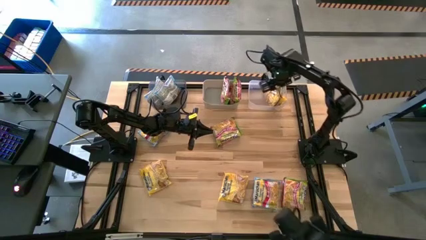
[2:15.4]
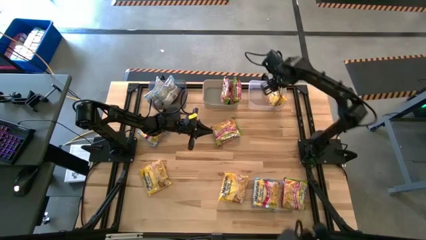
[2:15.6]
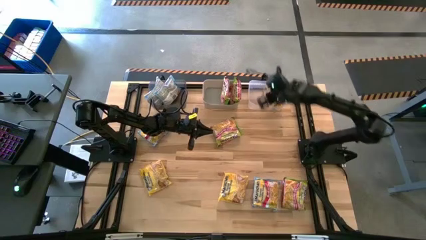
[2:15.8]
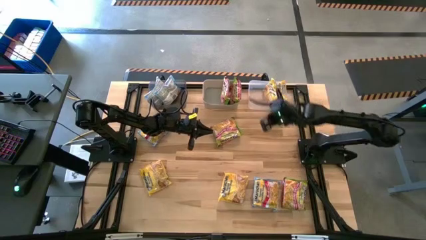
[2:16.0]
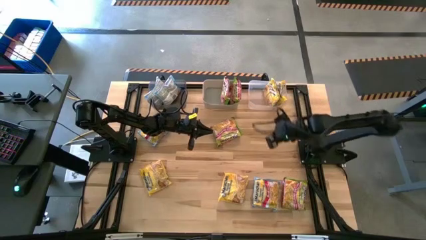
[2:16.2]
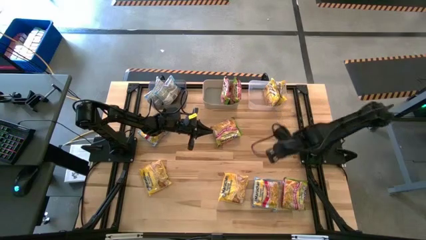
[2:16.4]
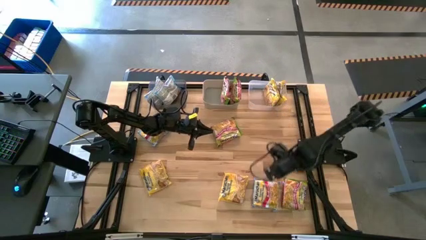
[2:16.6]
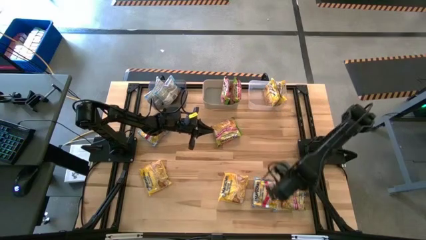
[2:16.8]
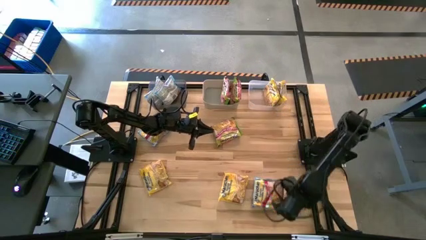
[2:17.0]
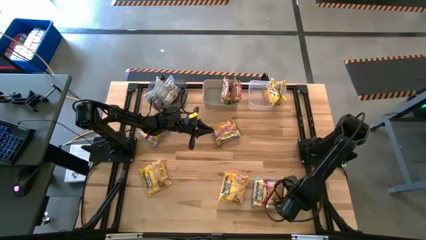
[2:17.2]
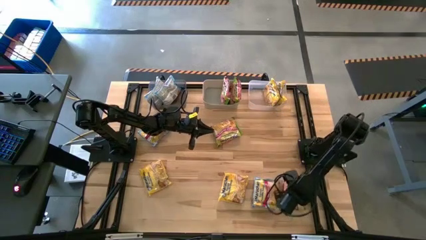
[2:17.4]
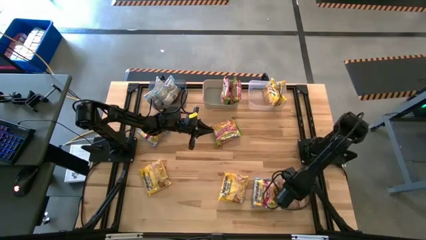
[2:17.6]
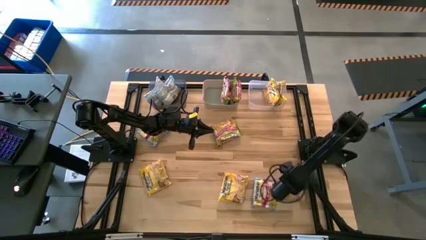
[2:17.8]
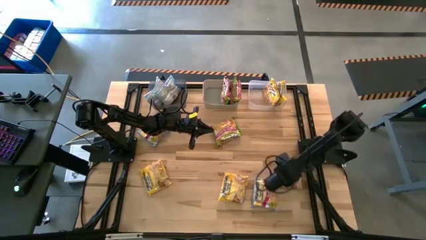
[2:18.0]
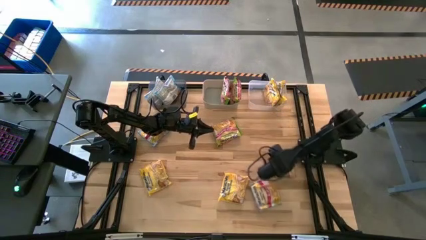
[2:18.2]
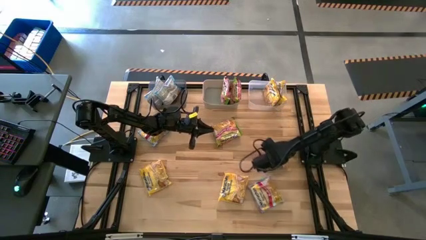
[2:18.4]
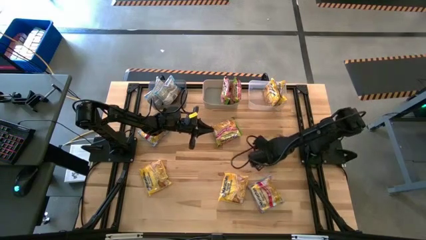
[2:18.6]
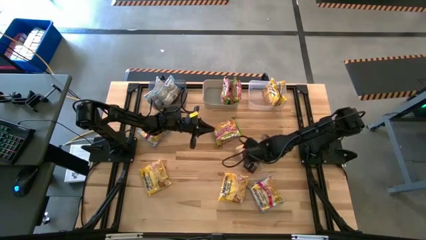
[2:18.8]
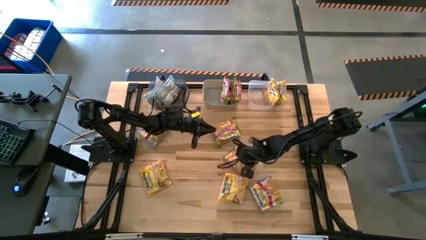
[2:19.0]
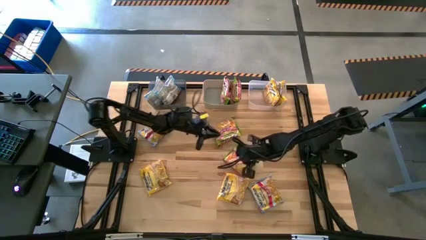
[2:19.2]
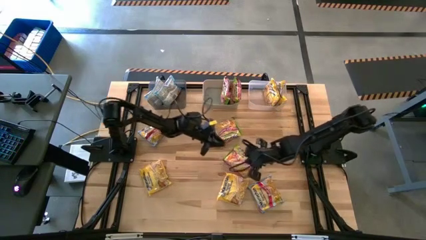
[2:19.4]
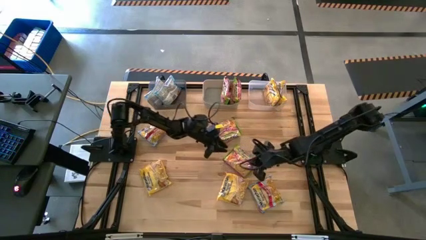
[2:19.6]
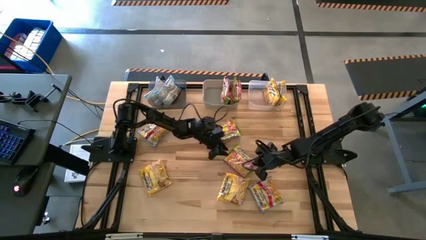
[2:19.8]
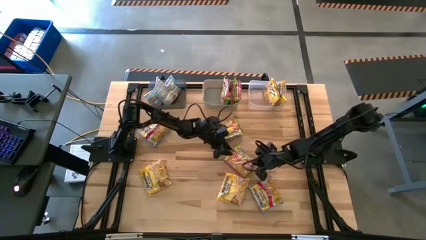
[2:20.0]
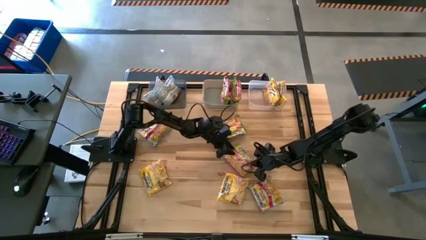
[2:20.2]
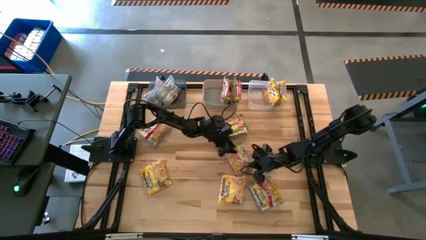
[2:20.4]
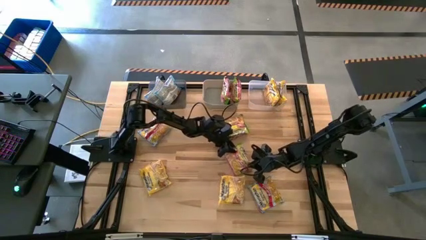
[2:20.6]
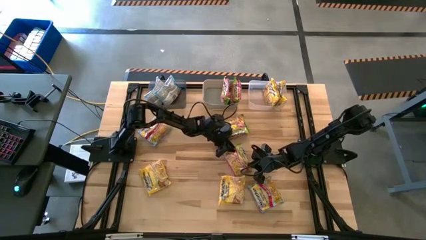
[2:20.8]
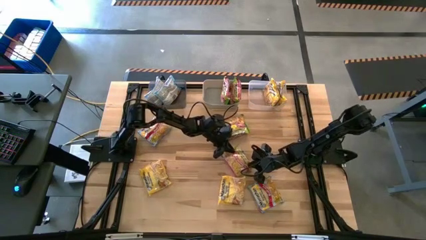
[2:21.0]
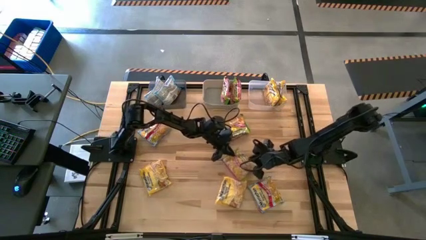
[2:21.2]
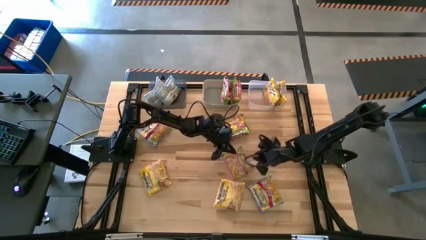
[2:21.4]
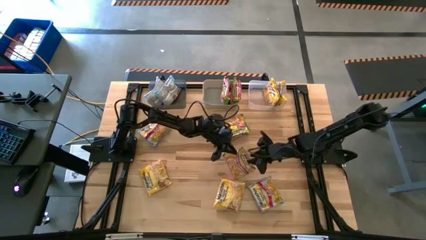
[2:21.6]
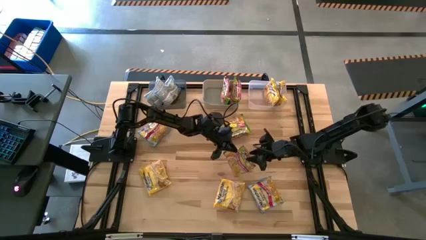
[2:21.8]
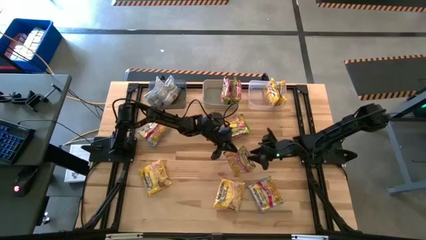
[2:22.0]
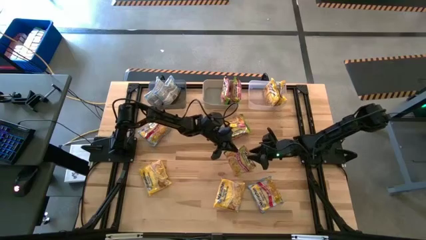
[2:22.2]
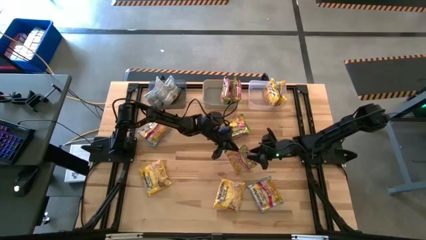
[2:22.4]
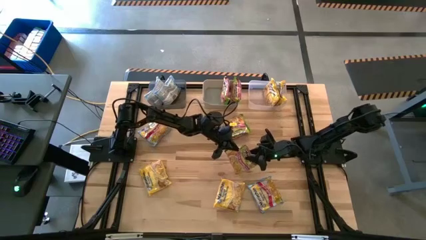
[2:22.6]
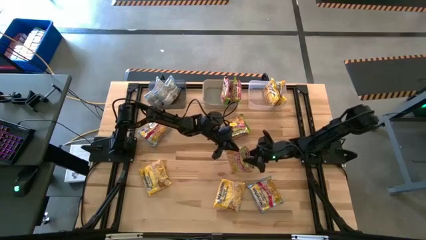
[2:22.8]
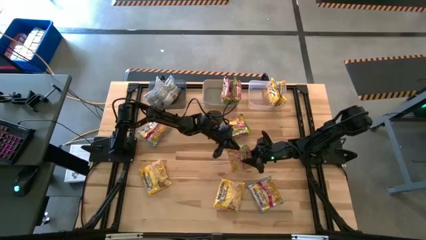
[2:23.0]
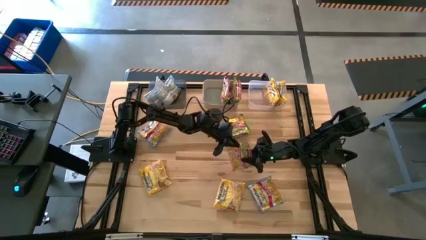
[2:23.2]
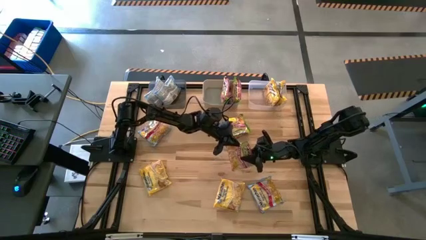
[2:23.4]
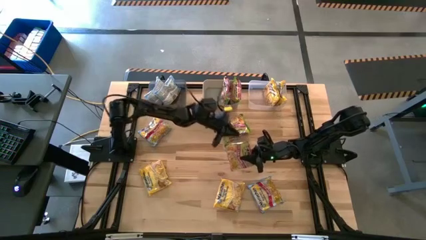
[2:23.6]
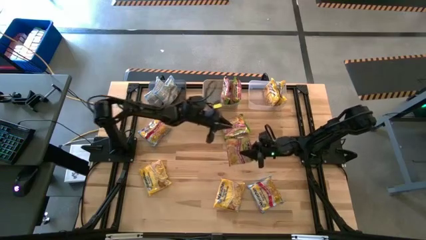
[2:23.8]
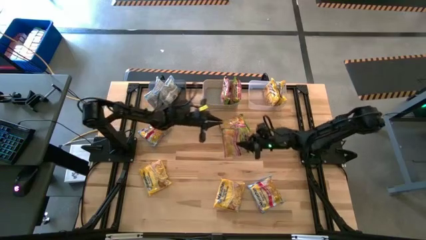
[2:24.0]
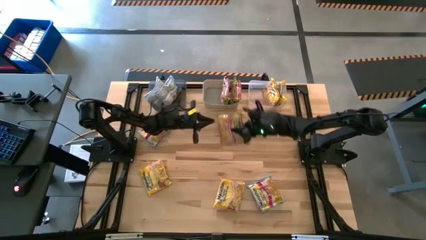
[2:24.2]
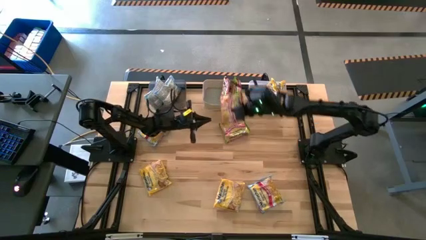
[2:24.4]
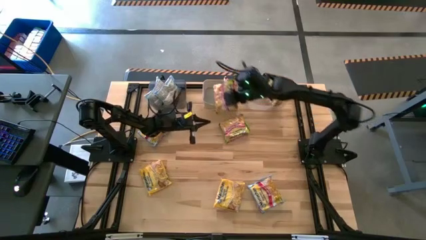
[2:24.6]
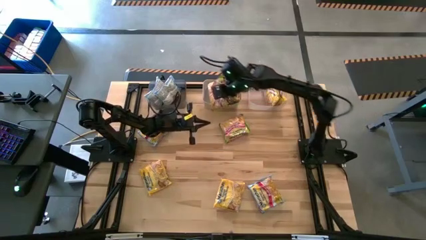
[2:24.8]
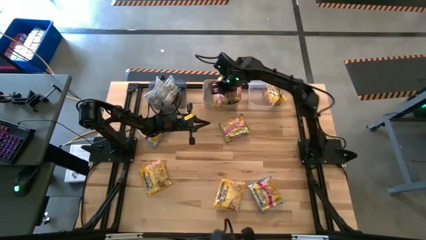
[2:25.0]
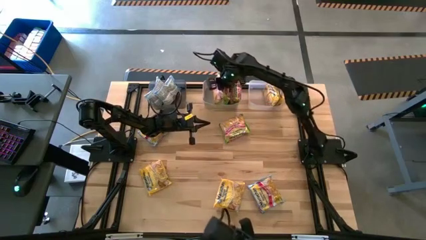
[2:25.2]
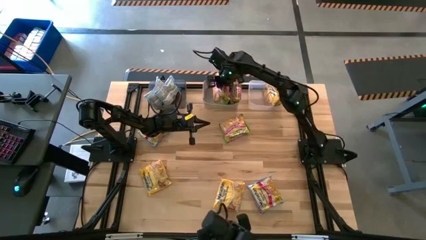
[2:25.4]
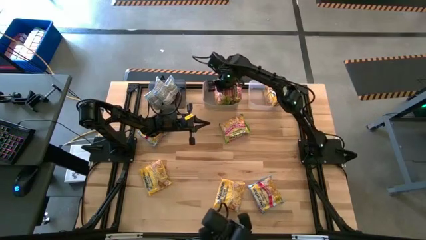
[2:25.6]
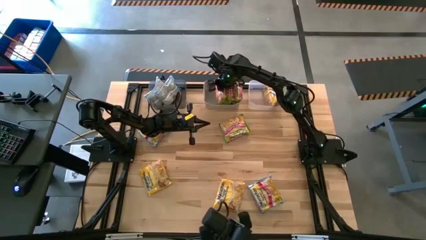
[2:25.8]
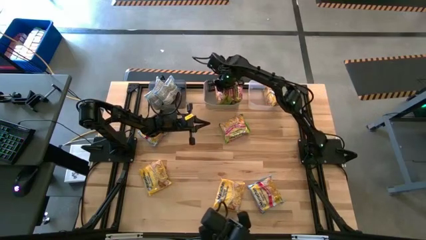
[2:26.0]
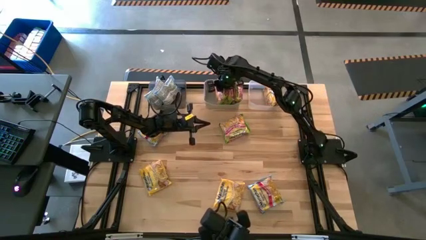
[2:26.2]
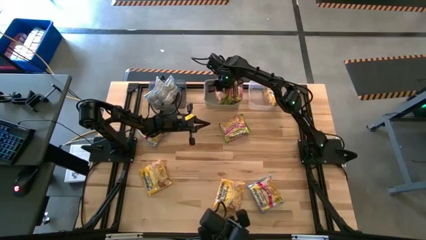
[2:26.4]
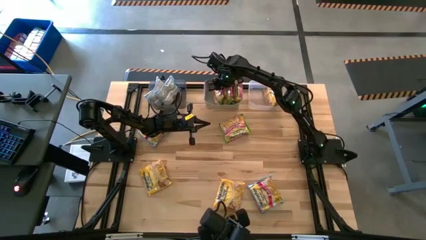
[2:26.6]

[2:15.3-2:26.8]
Task: Sort Maruchan noodles
Put the bottom green noodle pack into the gray bin

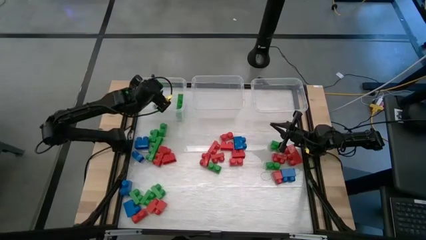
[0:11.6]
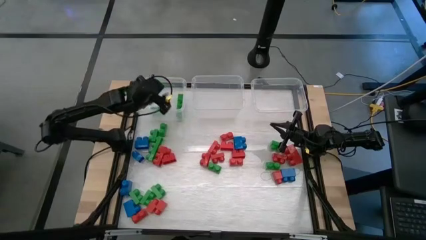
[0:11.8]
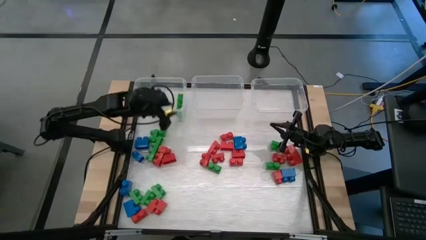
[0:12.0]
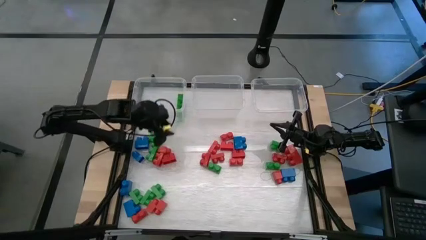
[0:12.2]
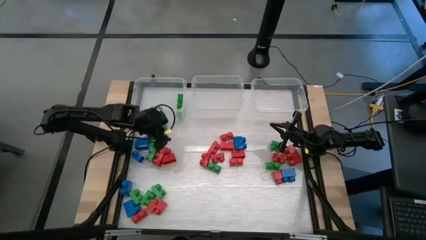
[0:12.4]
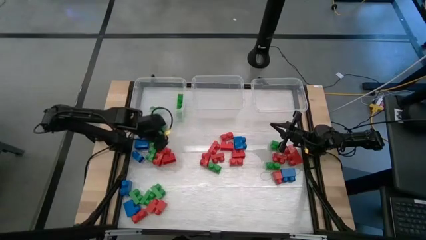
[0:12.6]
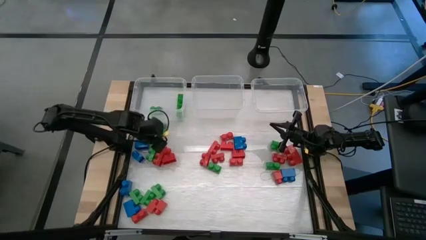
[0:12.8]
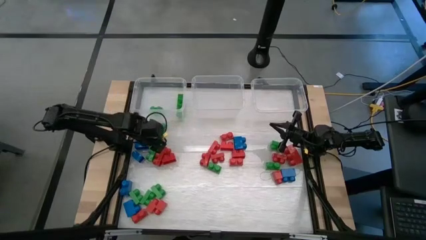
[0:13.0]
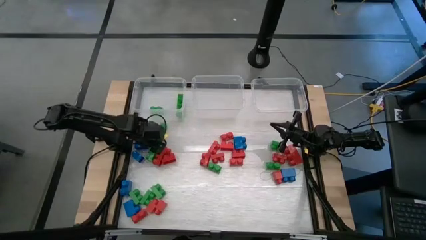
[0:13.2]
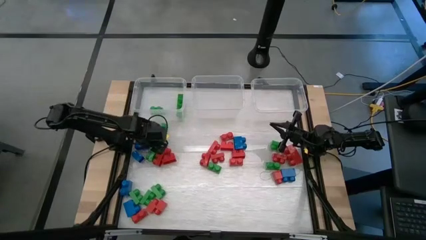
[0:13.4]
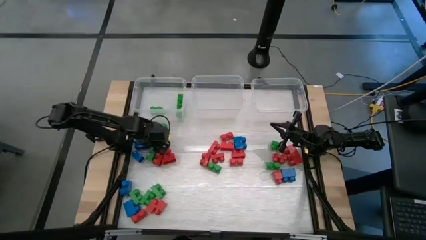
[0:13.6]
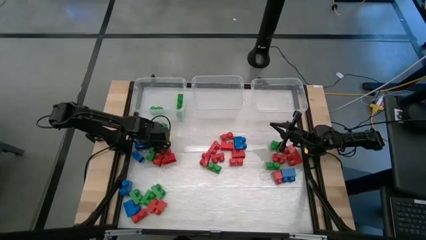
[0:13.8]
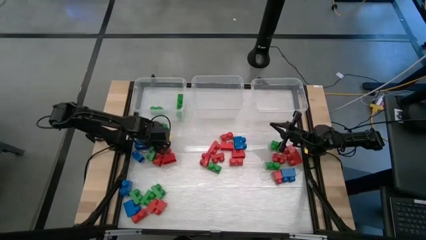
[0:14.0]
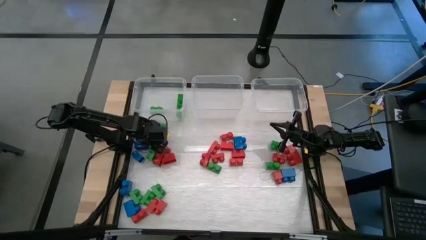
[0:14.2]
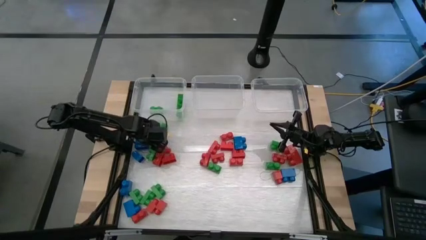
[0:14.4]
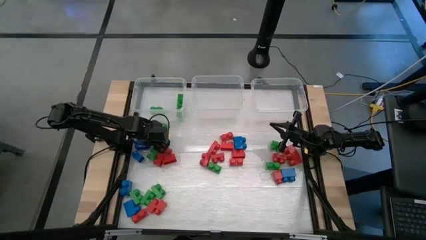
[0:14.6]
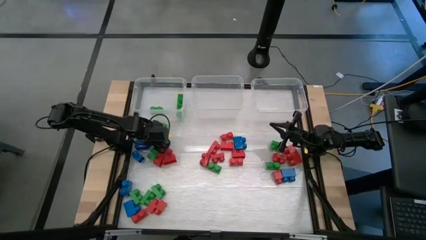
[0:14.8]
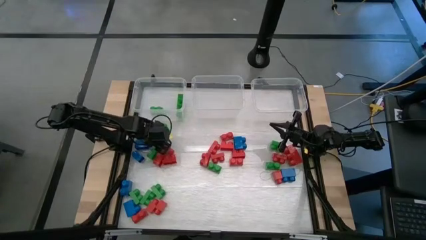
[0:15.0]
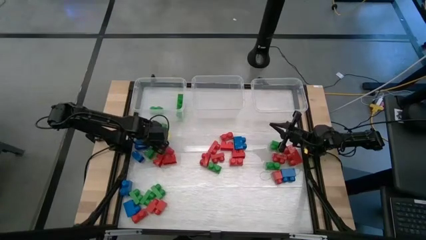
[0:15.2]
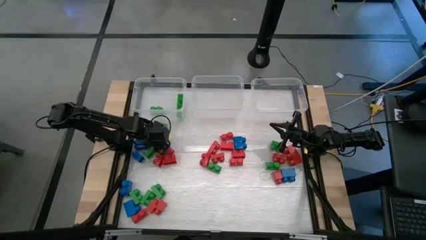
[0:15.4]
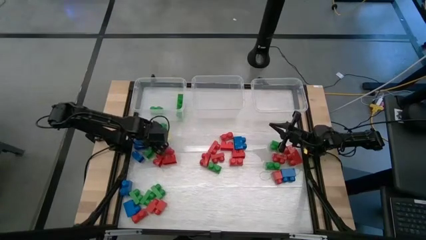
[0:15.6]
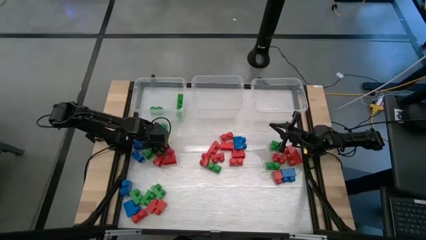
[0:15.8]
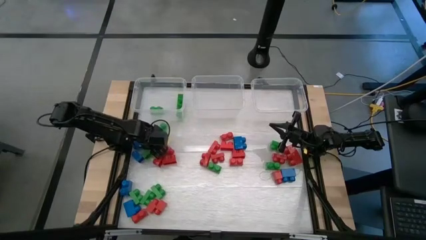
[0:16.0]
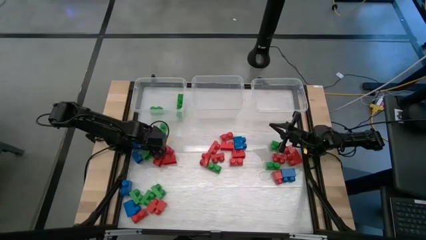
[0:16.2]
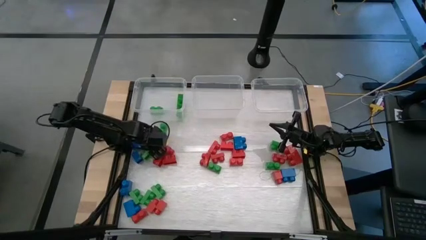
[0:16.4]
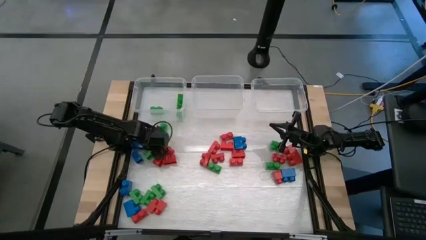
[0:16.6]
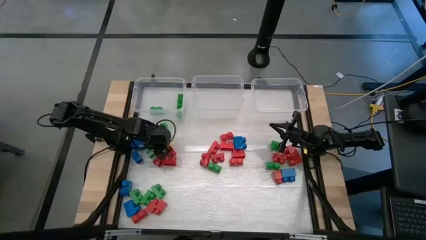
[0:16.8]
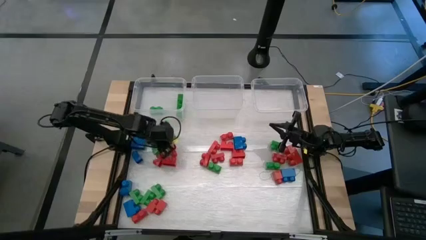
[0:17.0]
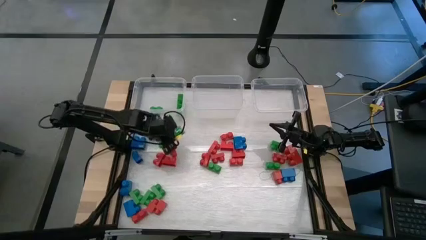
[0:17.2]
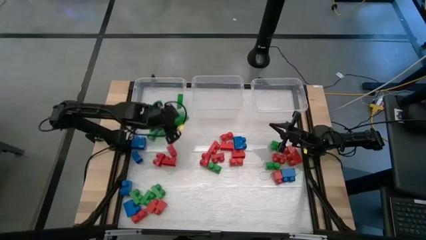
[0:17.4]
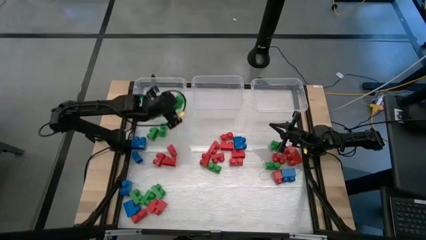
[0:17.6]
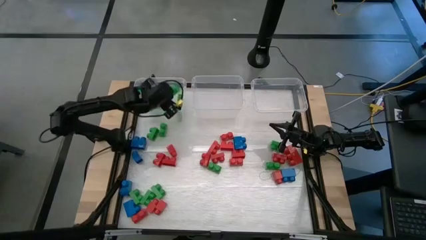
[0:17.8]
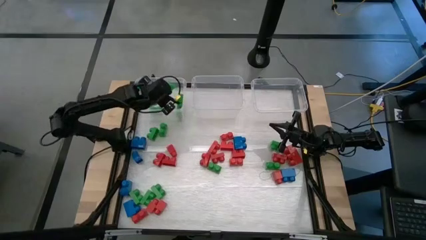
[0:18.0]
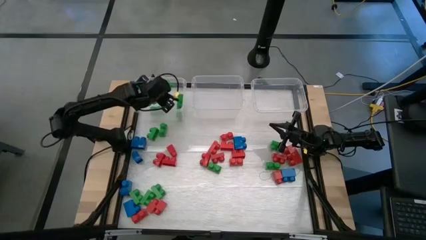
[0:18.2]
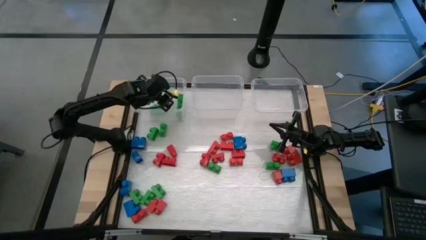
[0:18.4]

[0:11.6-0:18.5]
Task: Sort blocks
Put the green game piece into the left transparent bin
